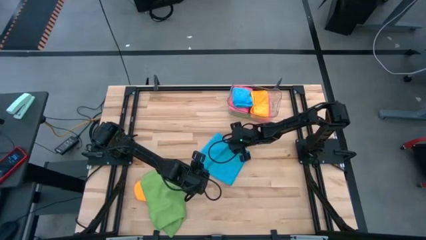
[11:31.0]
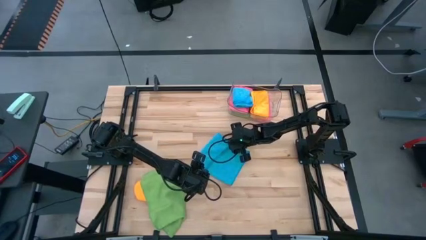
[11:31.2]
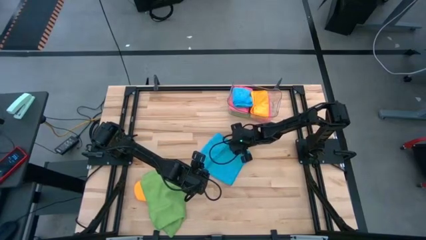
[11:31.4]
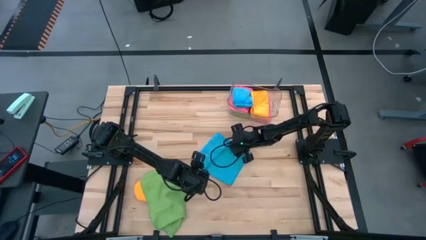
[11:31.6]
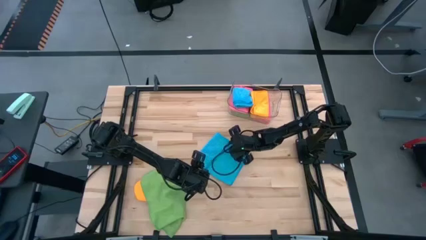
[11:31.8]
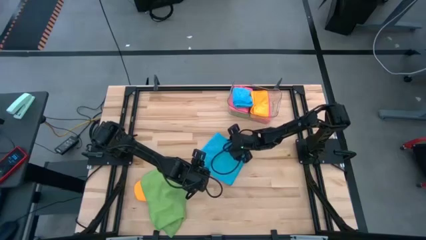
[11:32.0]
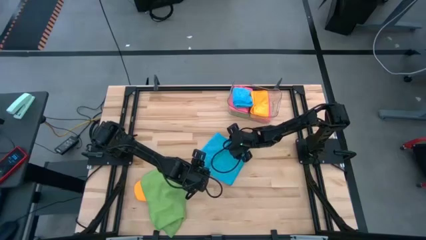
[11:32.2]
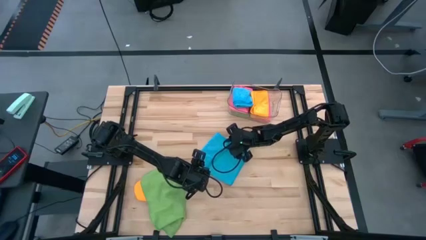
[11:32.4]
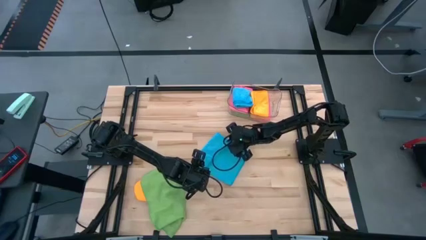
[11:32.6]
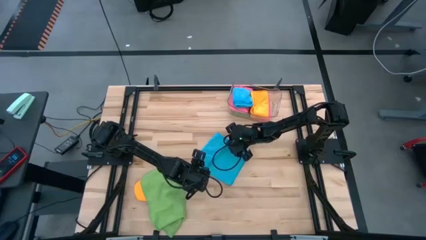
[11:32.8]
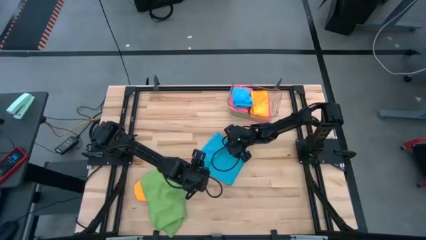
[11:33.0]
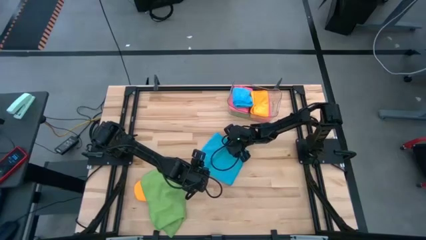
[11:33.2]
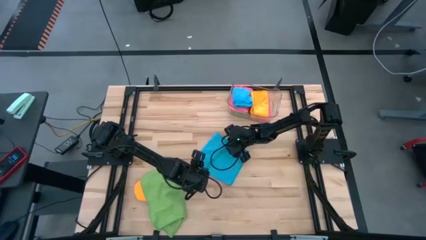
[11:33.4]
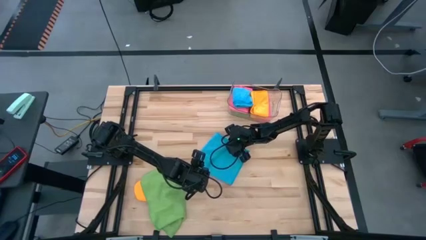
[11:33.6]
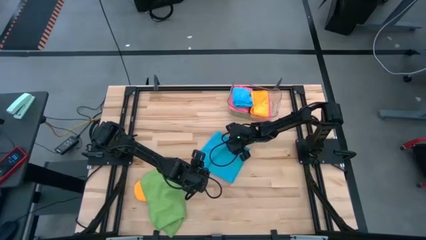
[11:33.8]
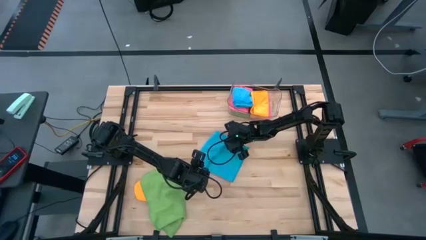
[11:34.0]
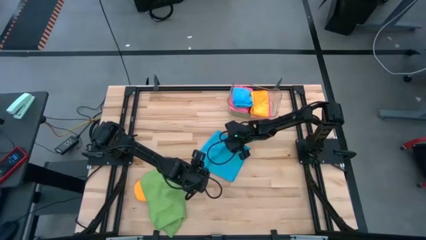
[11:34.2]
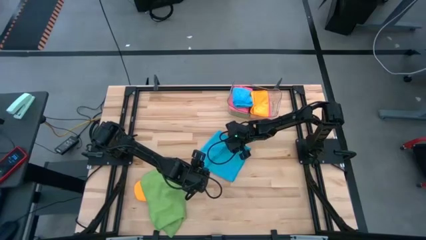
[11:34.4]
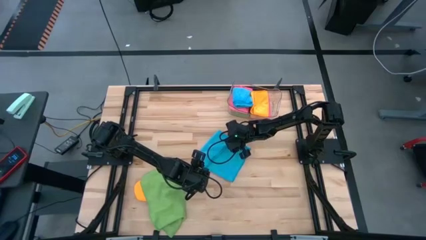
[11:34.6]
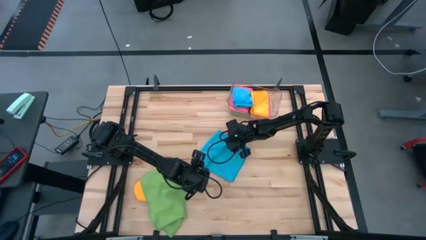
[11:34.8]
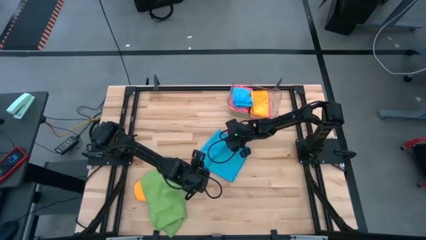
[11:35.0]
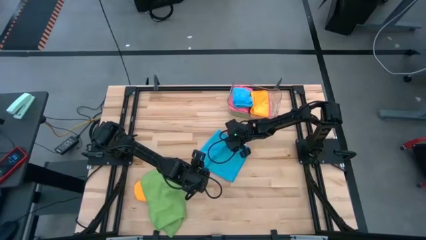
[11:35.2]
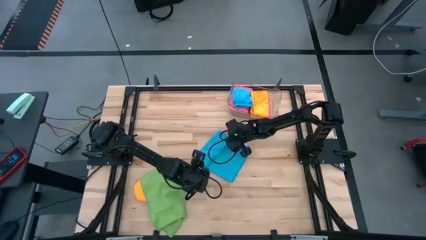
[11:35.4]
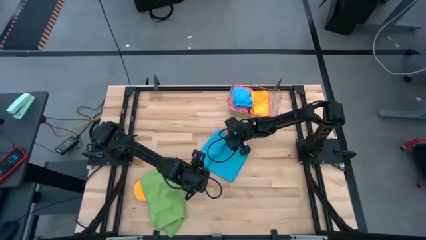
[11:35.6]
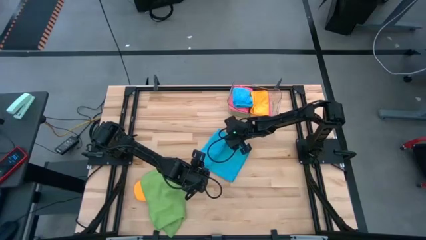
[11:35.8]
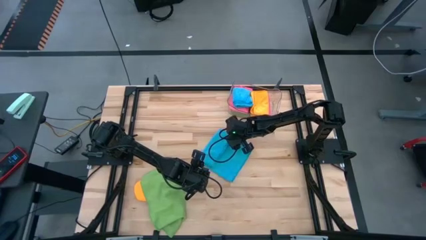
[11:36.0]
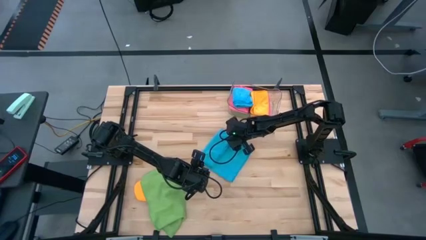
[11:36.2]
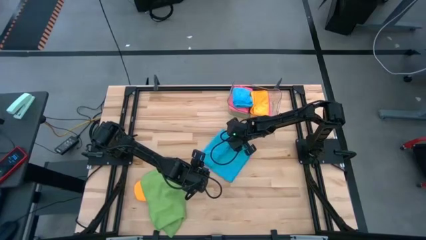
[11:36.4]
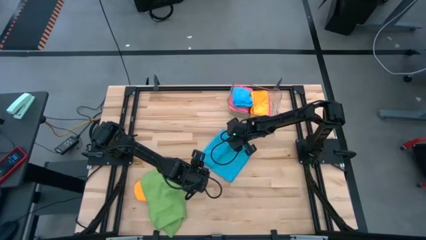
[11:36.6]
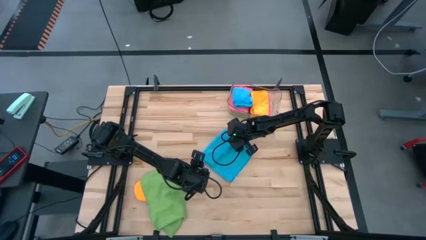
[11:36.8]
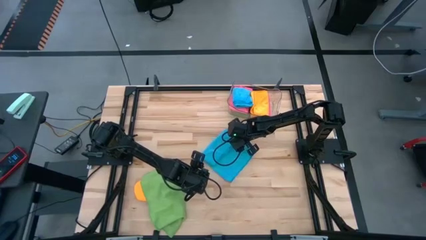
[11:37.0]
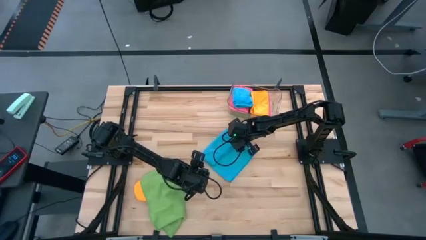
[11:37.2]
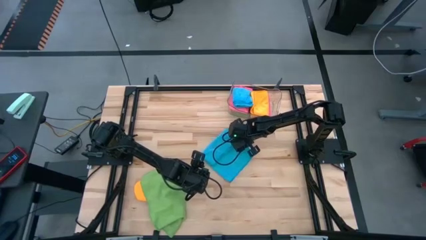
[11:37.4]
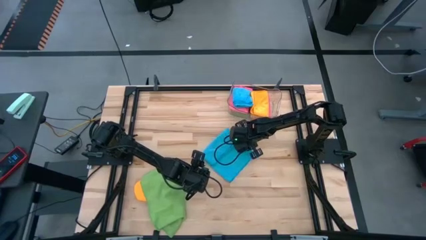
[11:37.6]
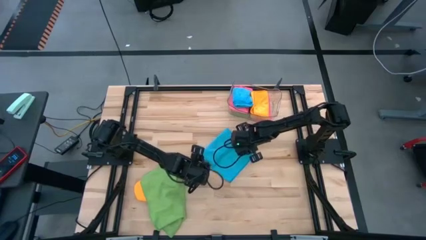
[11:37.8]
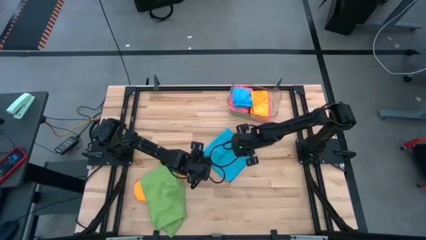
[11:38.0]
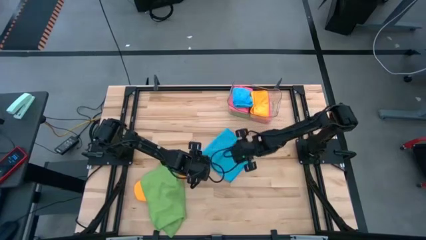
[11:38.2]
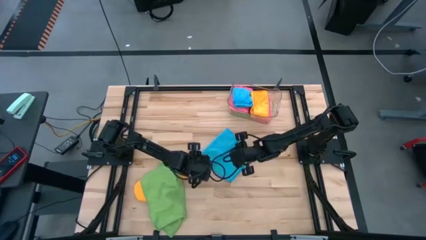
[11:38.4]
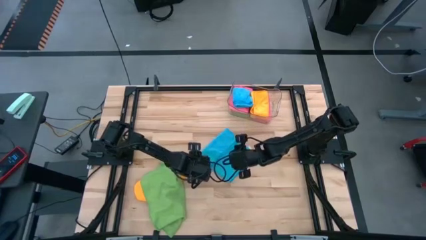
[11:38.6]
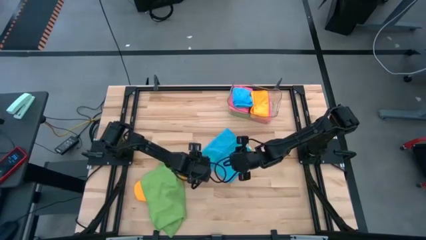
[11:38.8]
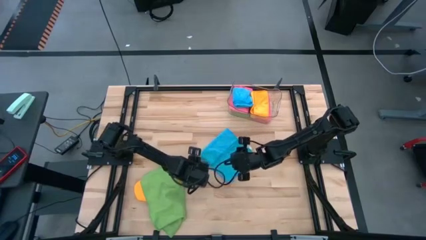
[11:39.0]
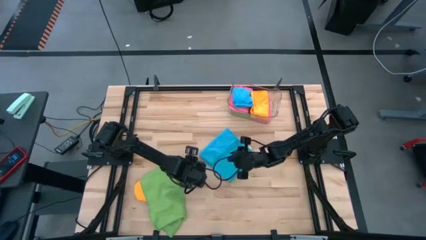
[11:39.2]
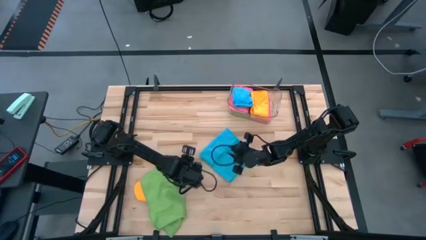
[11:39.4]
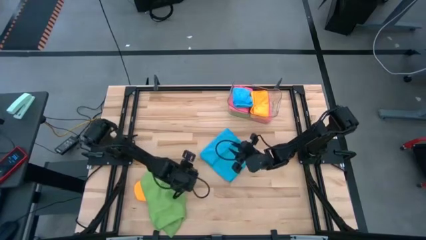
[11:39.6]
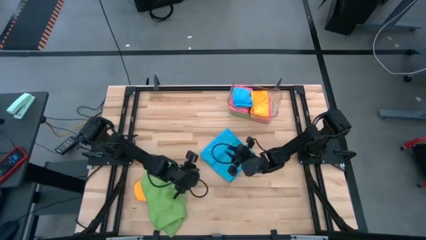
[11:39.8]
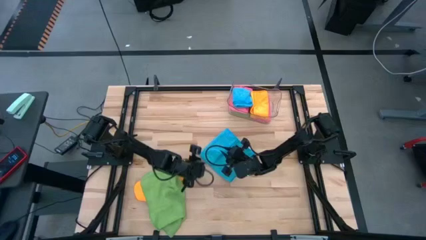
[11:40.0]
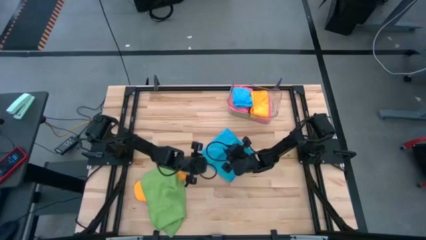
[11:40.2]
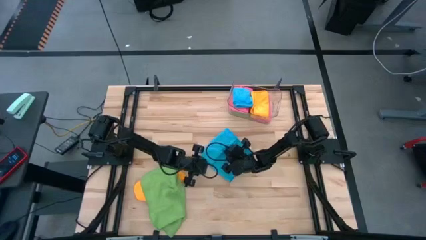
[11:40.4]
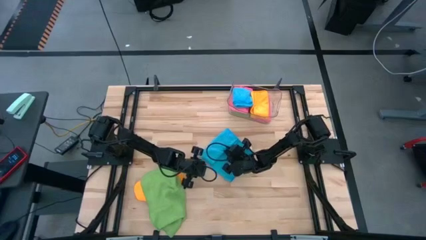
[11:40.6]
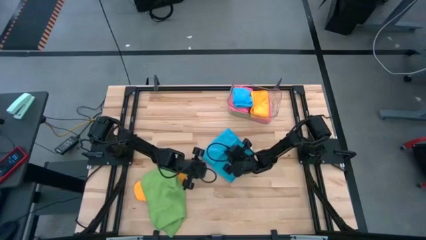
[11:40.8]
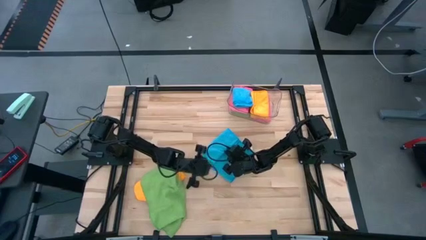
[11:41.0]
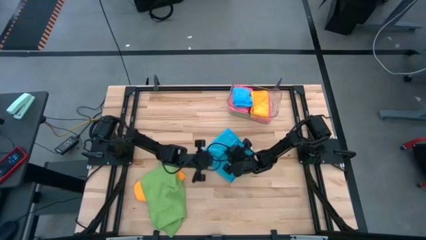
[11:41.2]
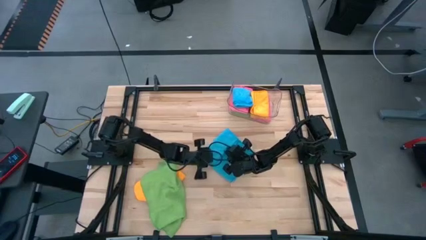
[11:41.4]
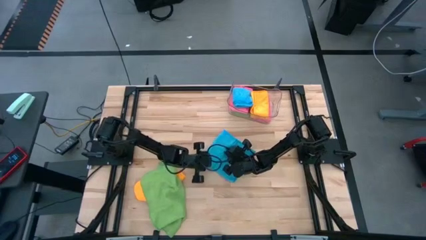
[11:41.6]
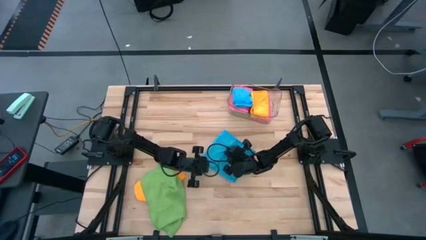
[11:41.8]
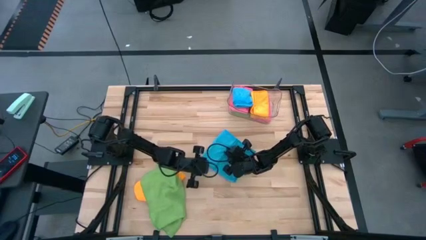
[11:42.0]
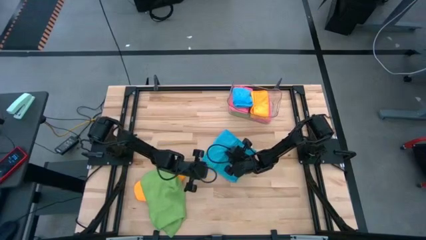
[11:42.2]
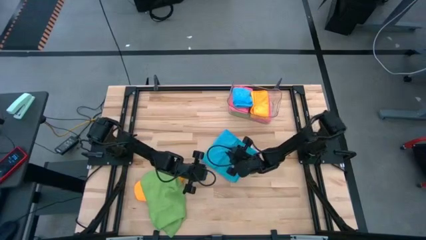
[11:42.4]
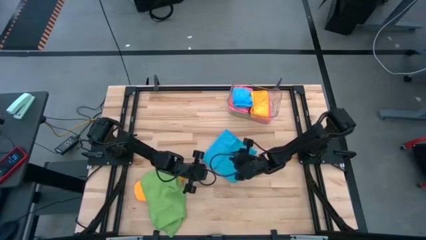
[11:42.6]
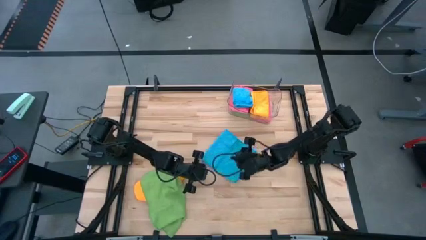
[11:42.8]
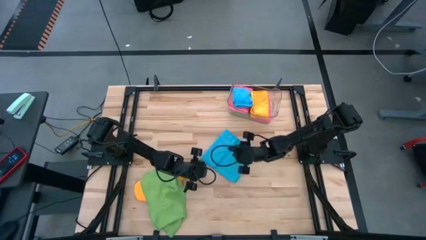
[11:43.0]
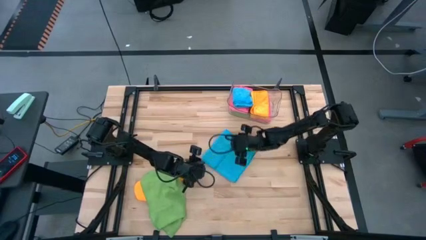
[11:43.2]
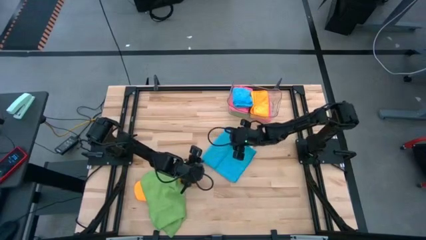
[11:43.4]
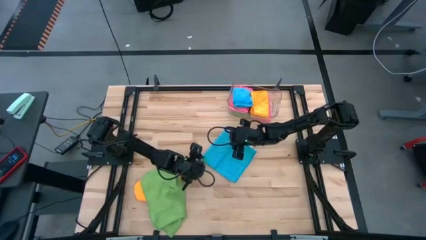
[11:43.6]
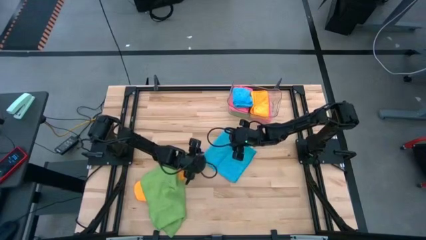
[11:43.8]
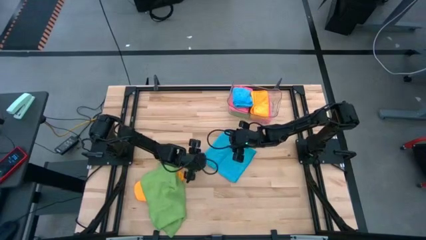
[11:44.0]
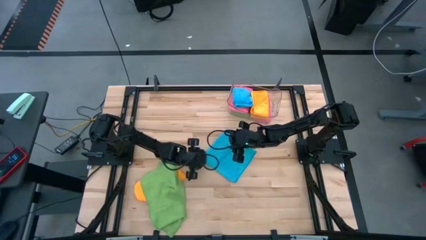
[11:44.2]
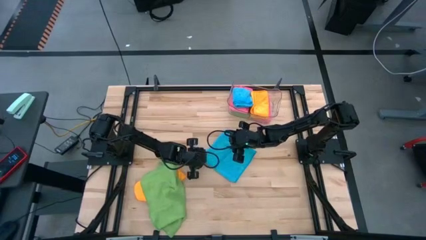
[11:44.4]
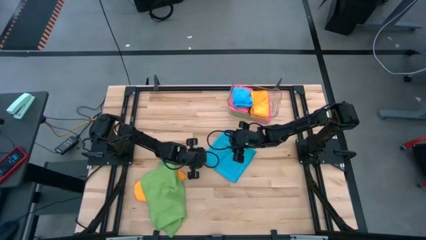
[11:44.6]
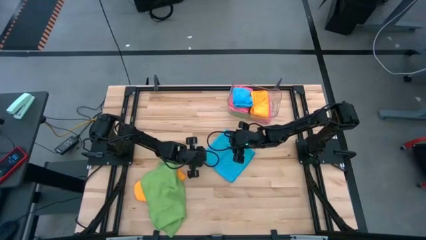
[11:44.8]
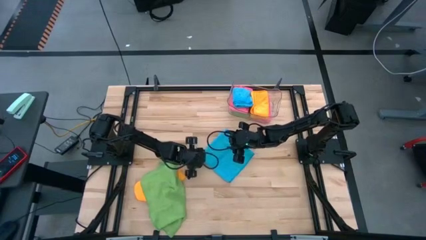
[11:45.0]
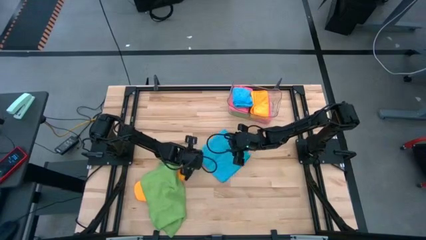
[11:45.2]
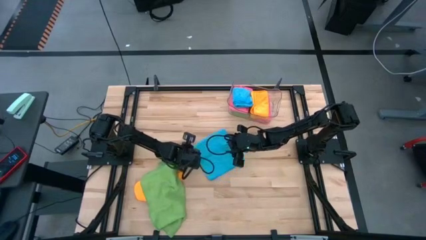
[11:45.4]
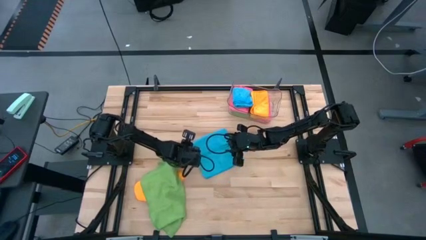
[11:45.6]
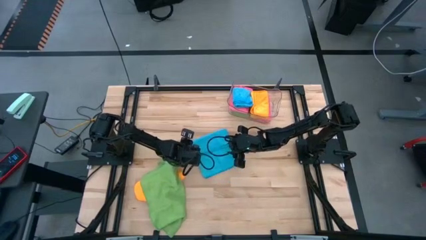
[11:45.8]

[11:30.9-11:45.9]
Task: Fold microfiber towels
Fold the blue towel
